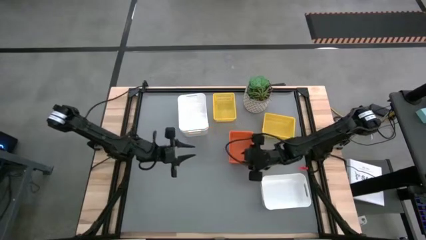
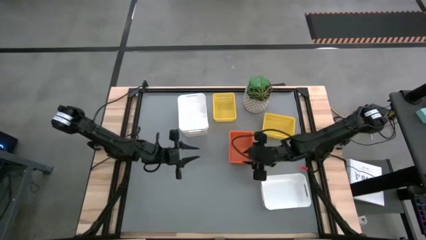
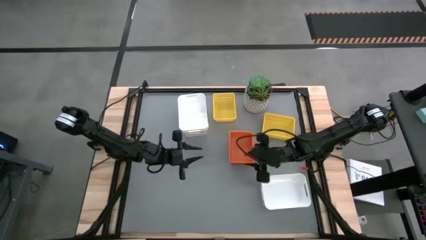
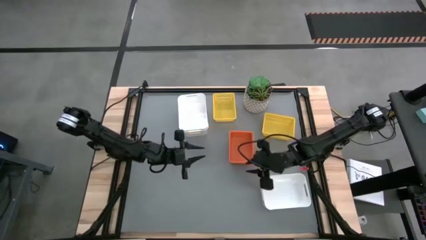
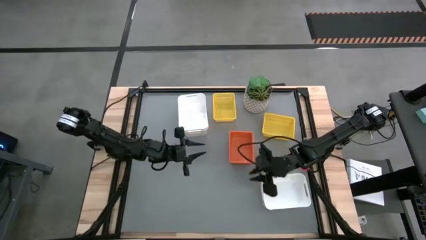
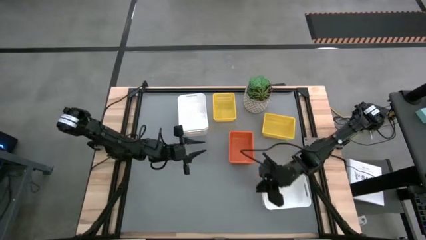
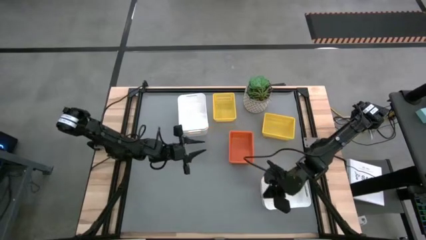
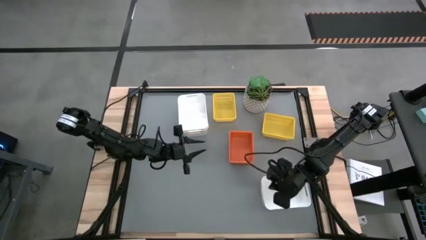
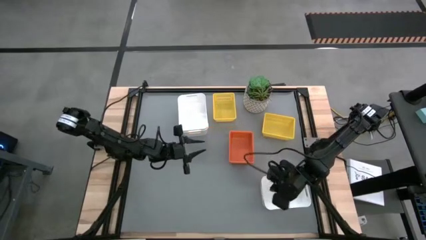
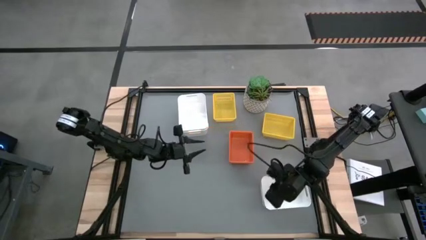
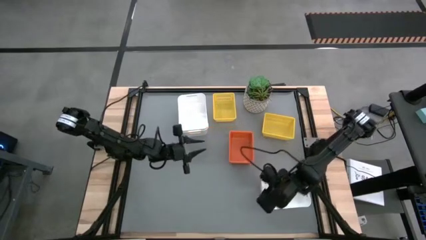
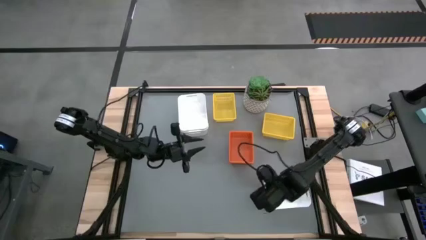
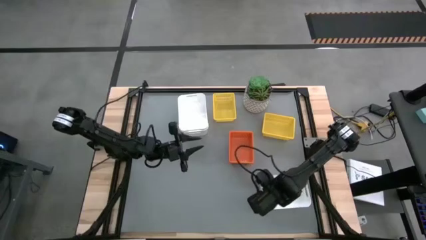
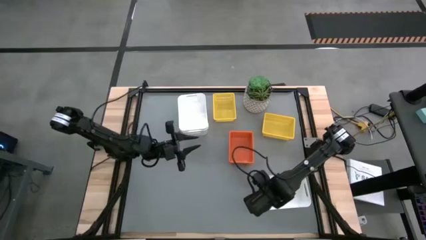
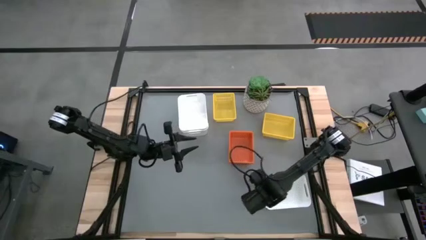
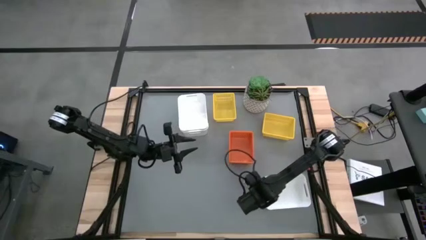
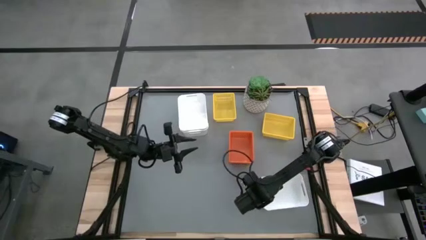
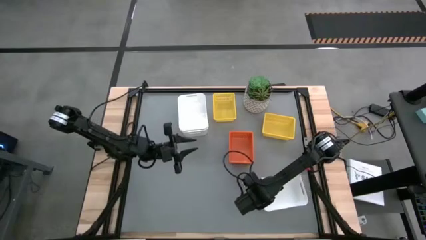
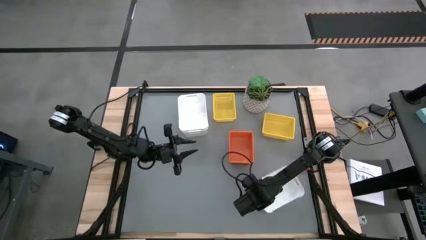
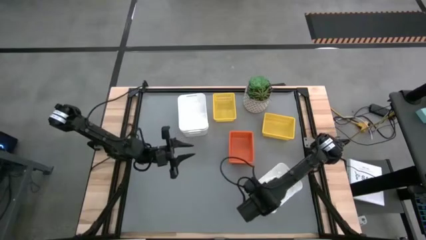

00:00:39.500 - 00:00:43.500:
Stack the bottom white bin on top of the top white bin

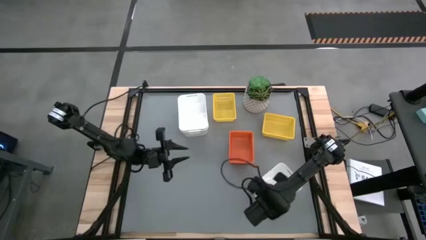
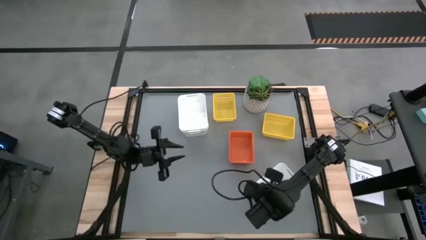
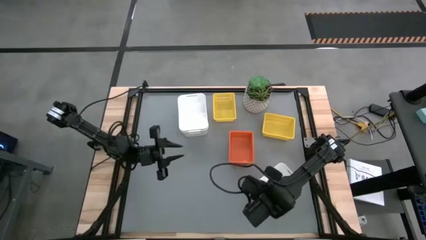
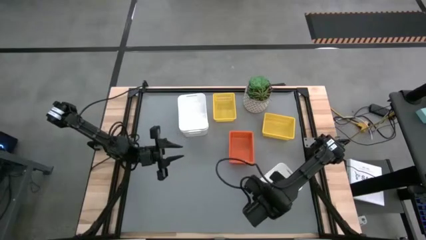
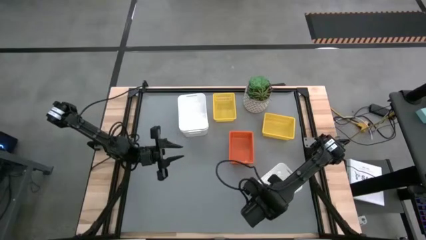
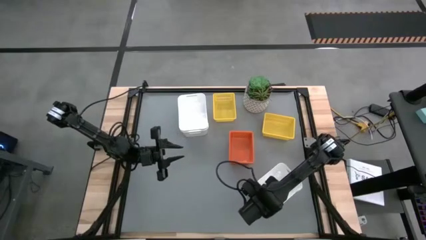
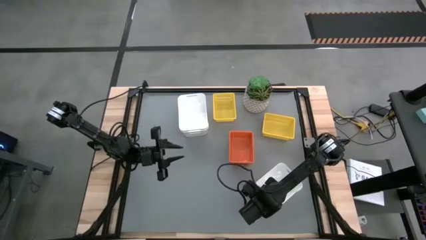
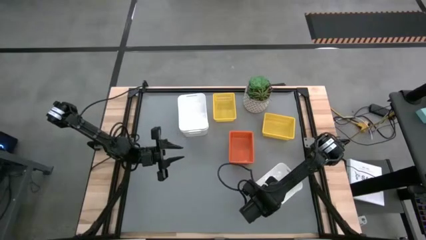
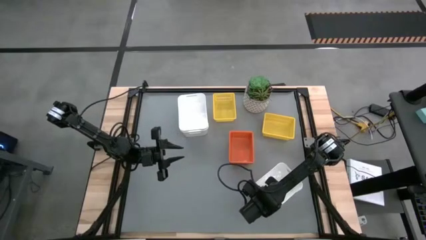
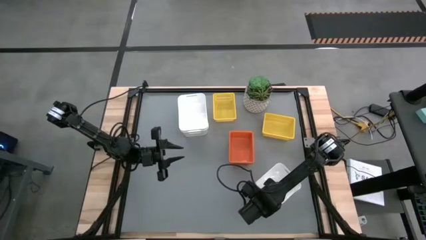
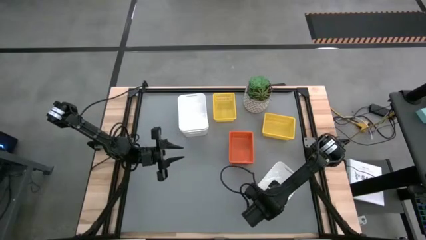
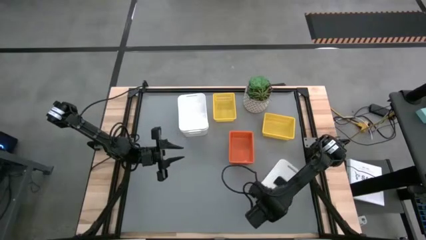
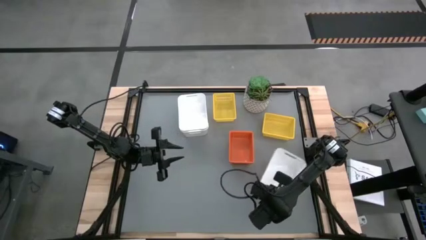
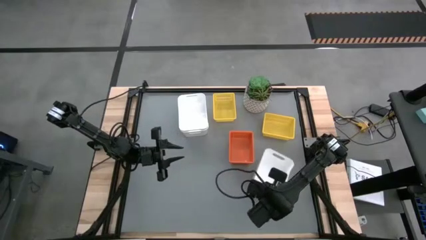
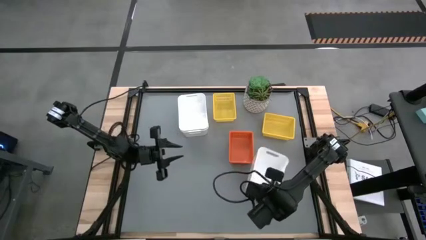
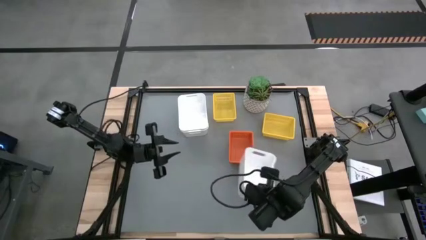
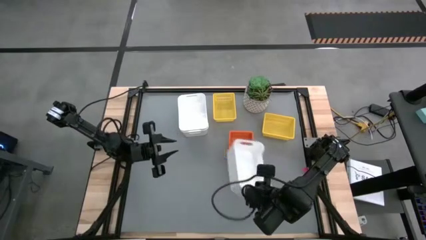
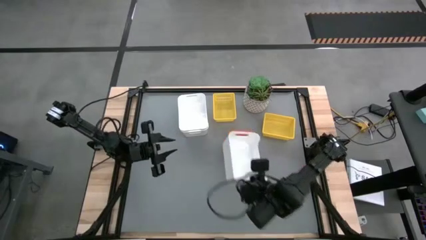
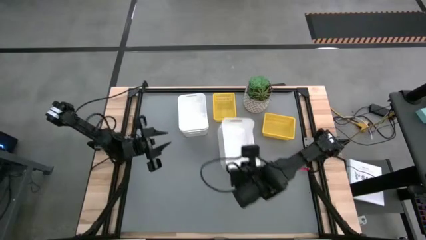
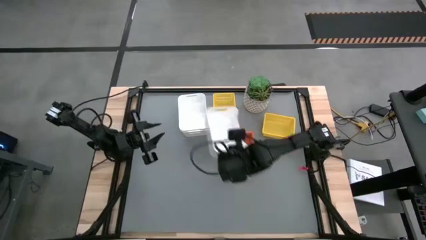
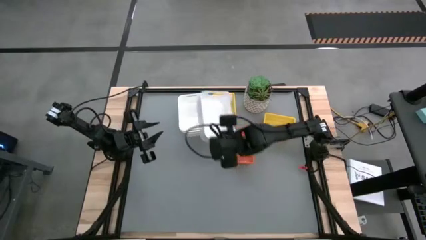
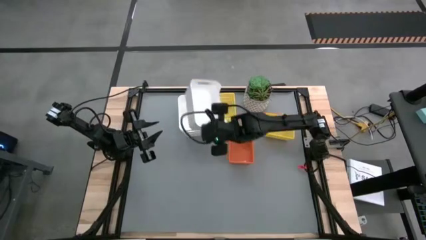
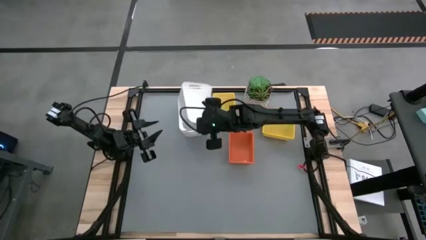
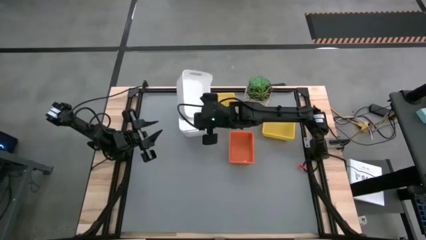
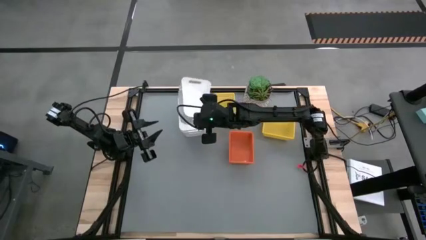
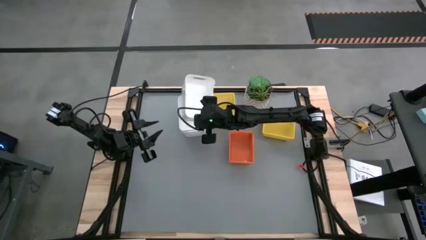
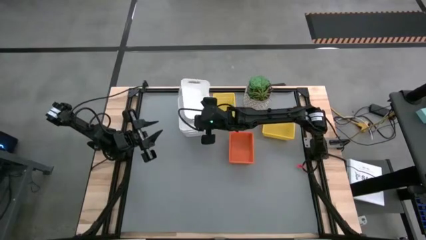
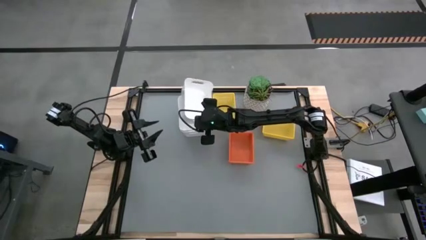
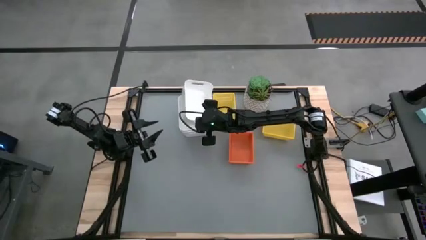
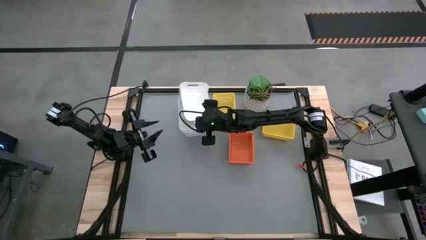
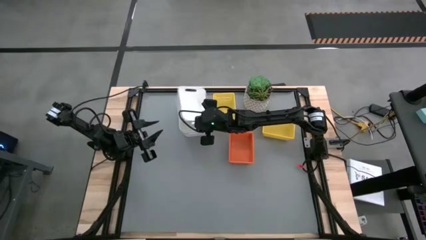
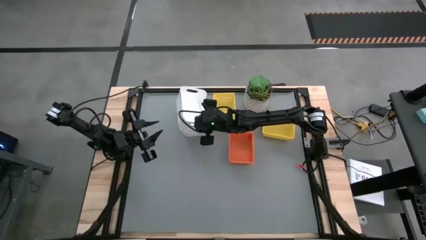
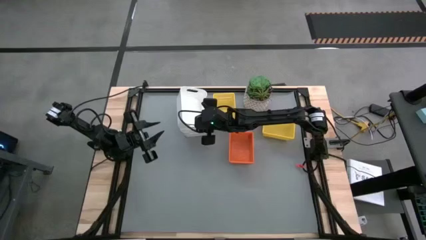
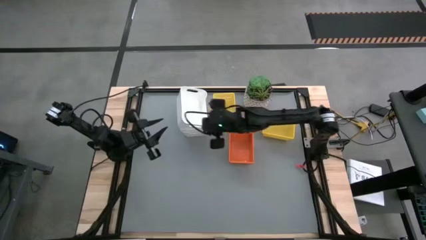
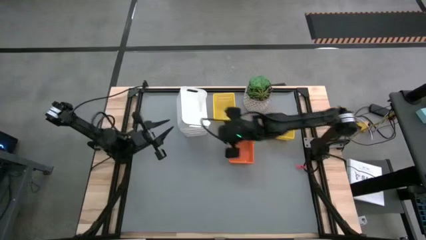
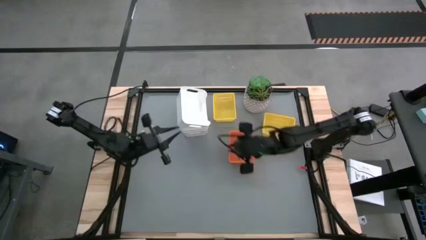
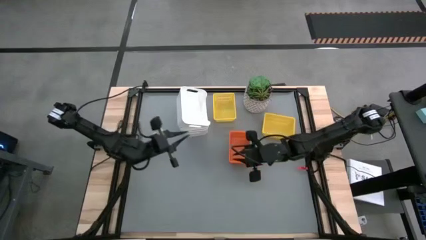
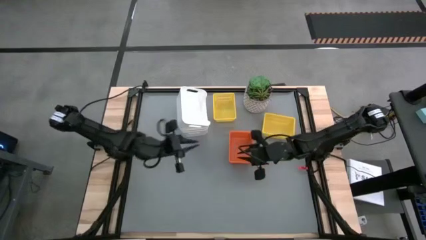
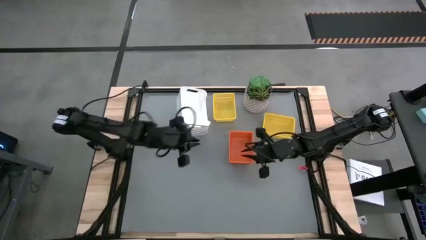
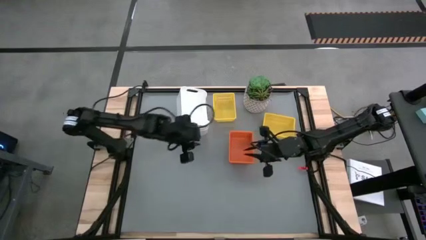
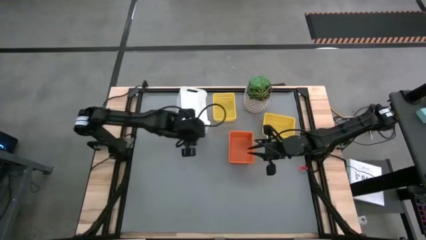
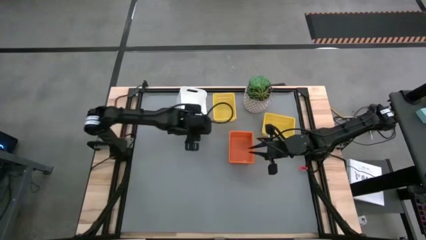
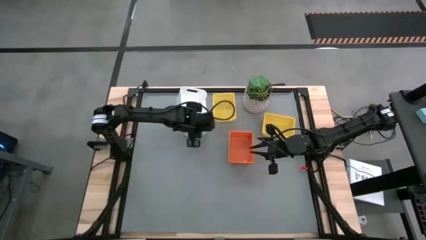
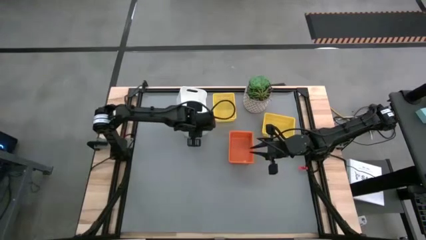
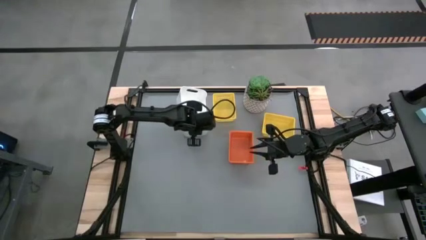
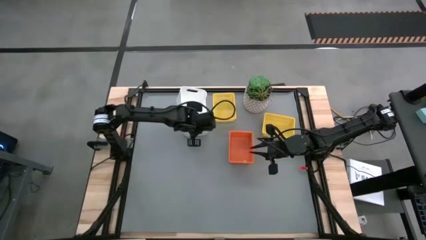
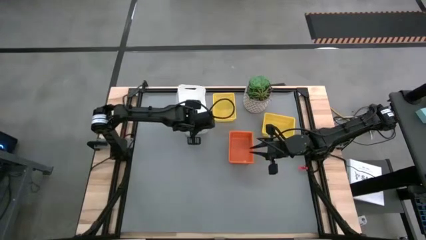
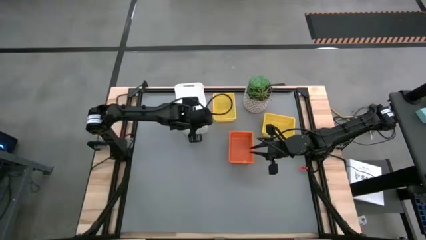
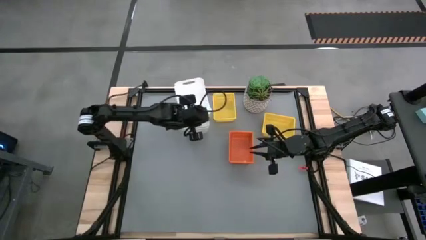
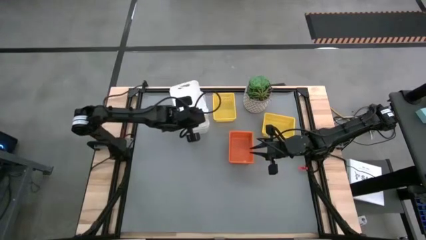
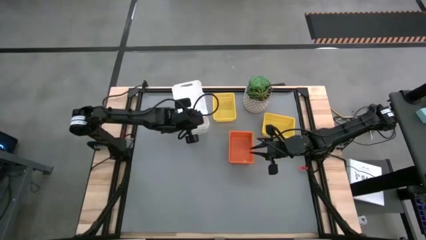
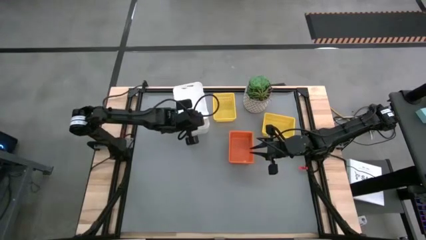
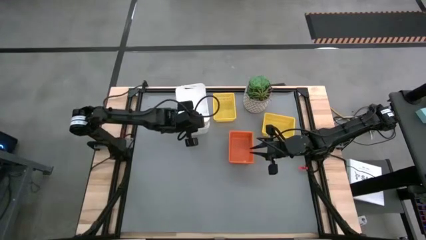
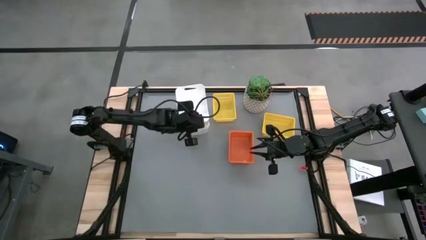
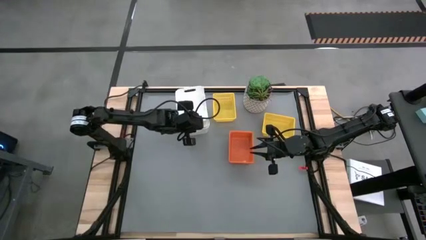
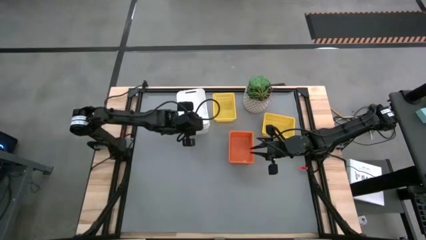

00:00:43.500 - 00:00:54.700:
Stack the bottom white bin on top of the top white bin
